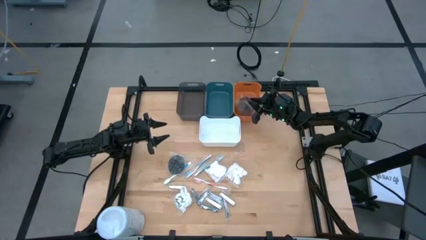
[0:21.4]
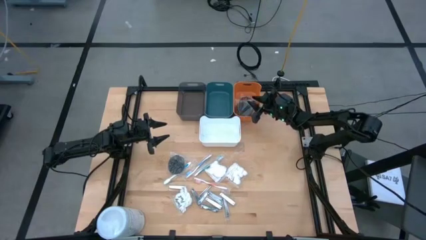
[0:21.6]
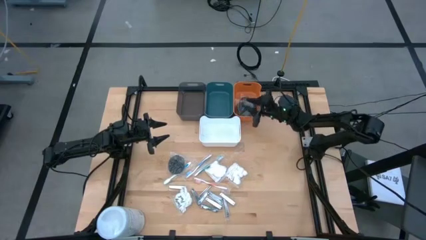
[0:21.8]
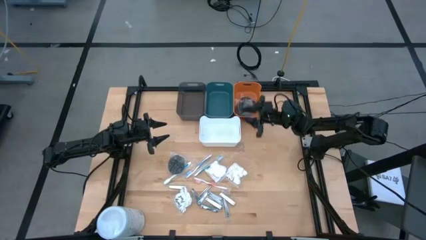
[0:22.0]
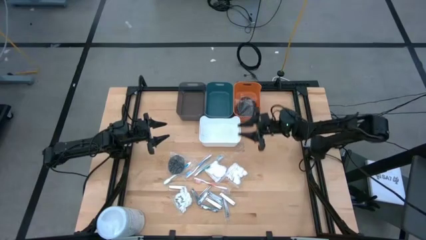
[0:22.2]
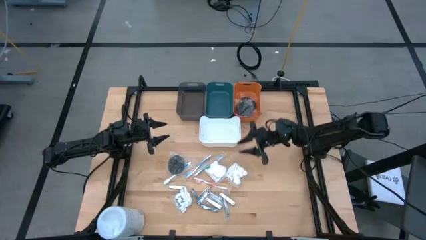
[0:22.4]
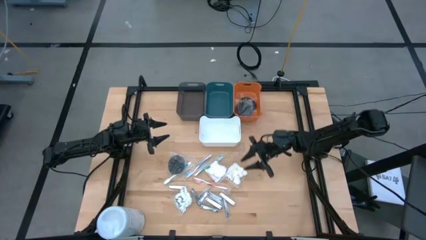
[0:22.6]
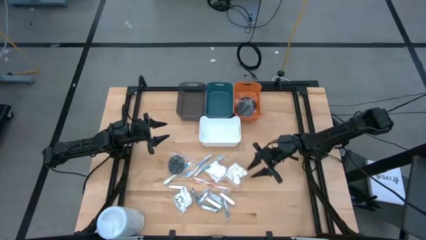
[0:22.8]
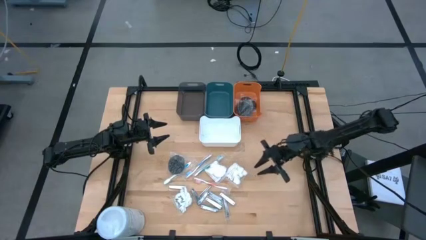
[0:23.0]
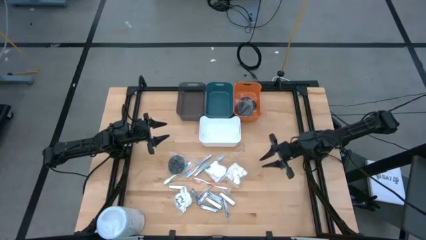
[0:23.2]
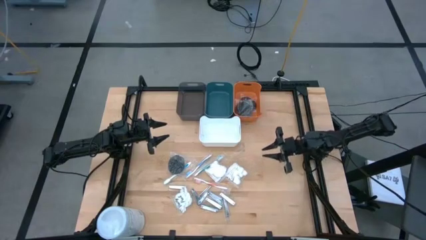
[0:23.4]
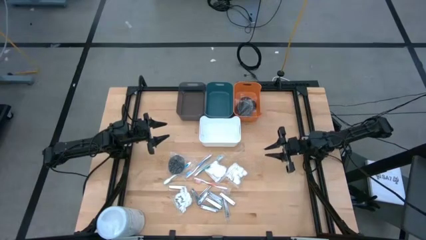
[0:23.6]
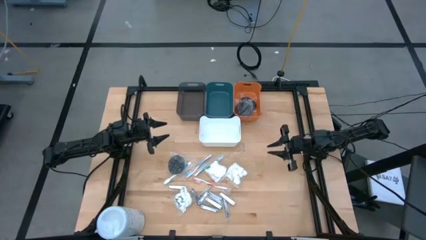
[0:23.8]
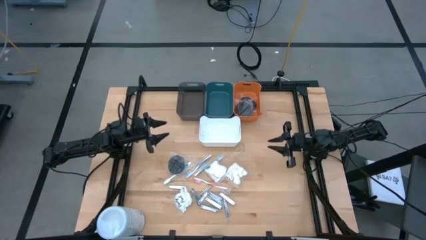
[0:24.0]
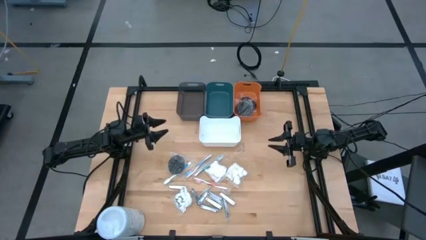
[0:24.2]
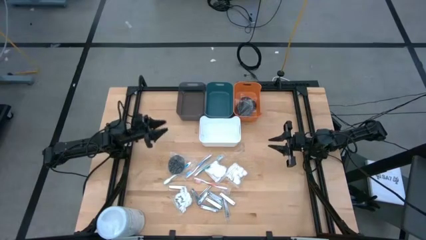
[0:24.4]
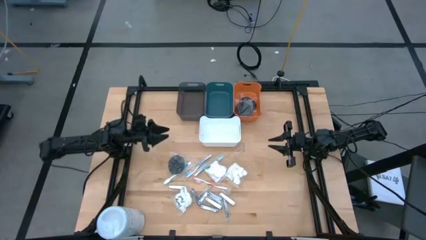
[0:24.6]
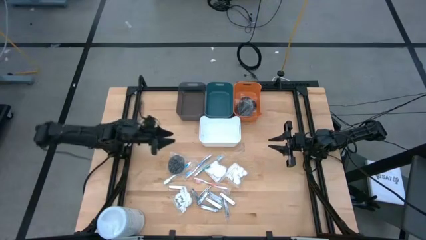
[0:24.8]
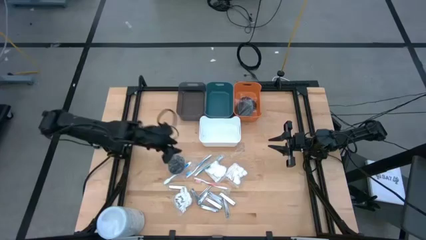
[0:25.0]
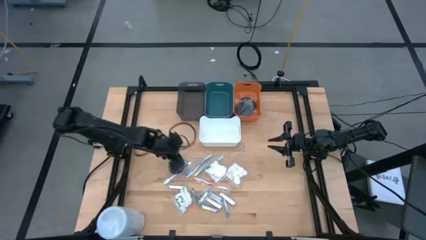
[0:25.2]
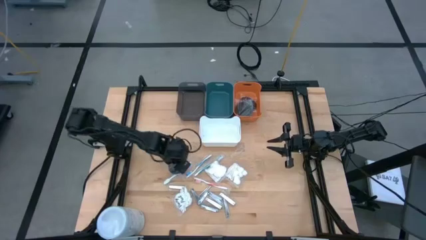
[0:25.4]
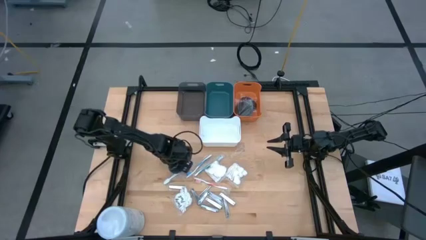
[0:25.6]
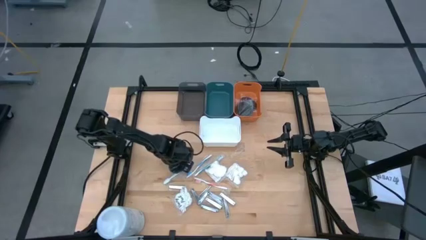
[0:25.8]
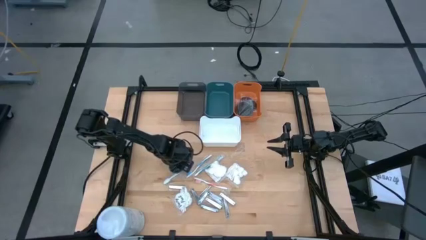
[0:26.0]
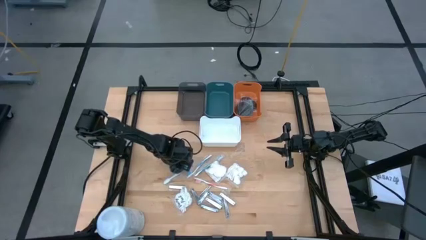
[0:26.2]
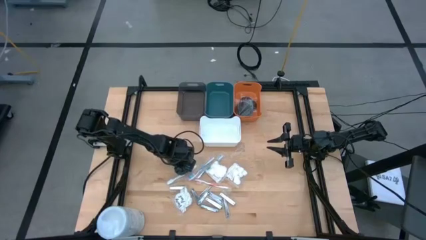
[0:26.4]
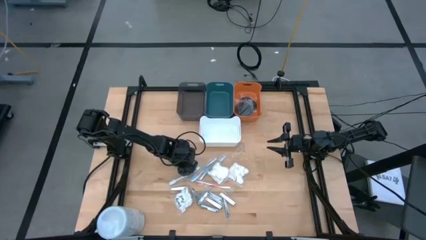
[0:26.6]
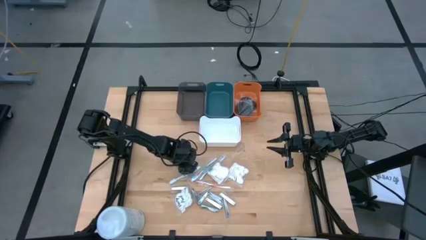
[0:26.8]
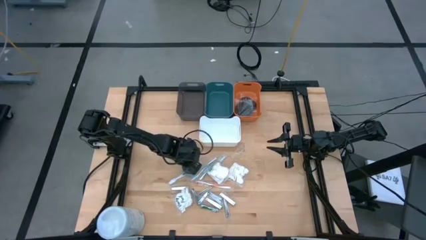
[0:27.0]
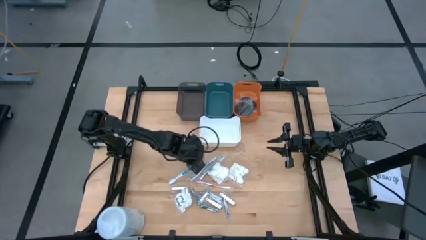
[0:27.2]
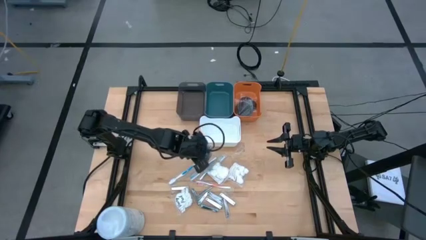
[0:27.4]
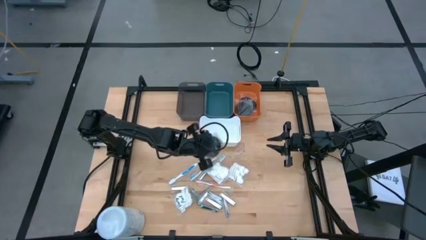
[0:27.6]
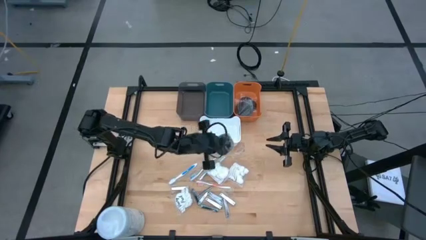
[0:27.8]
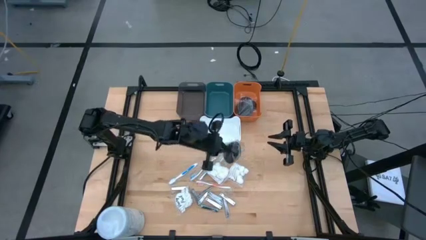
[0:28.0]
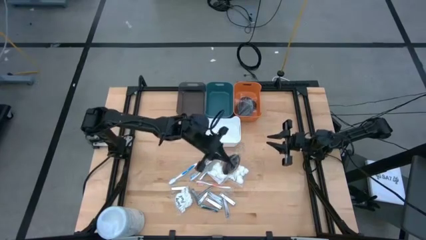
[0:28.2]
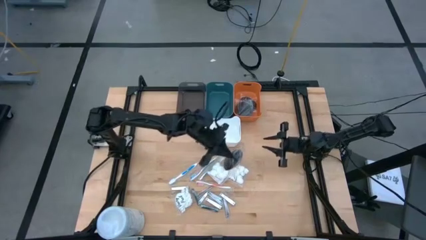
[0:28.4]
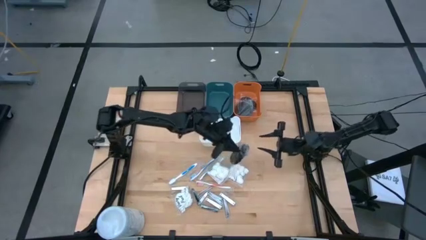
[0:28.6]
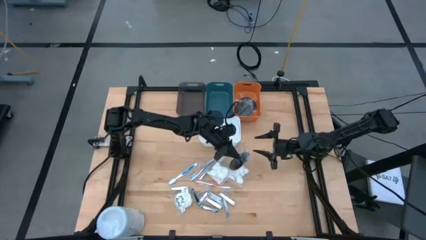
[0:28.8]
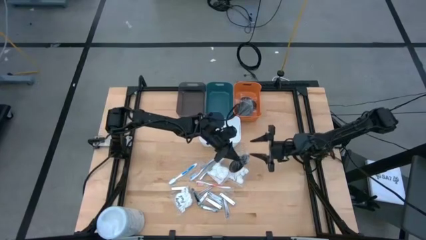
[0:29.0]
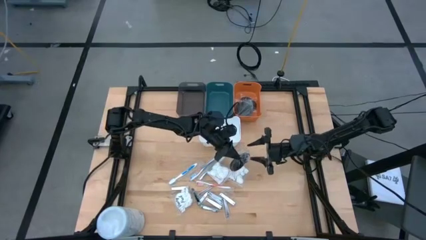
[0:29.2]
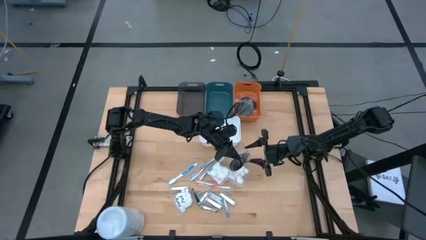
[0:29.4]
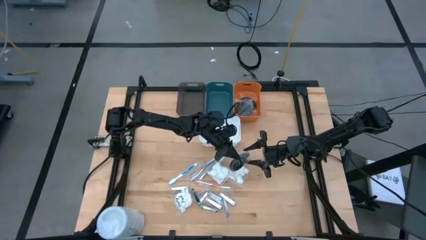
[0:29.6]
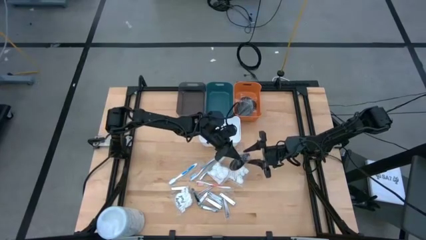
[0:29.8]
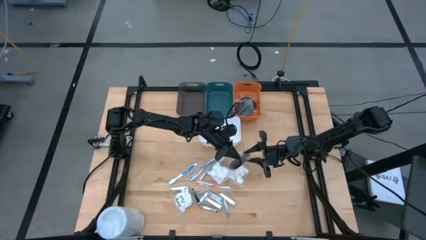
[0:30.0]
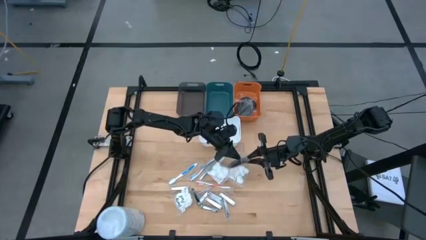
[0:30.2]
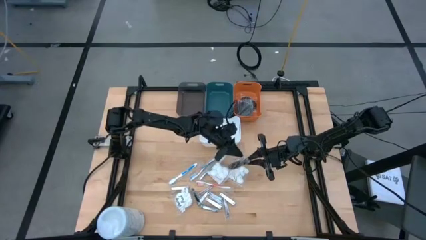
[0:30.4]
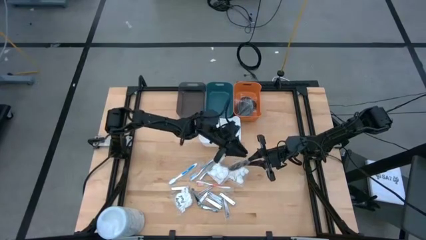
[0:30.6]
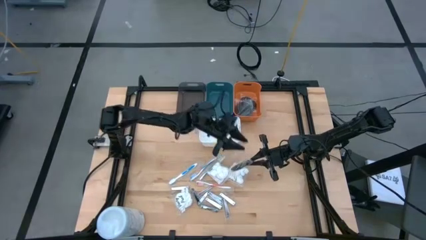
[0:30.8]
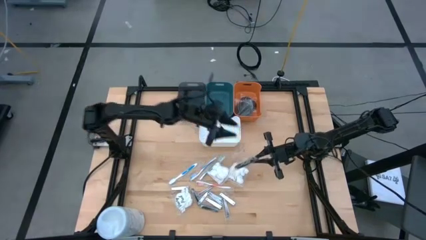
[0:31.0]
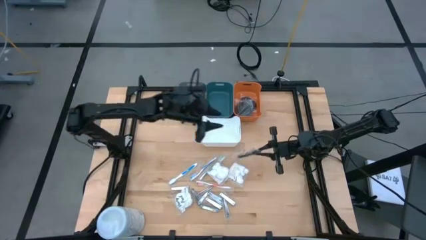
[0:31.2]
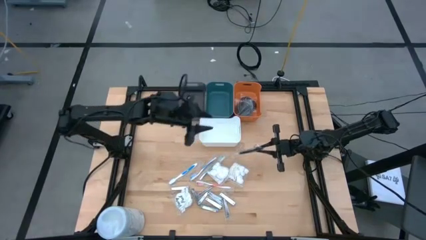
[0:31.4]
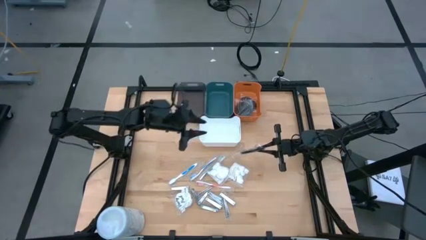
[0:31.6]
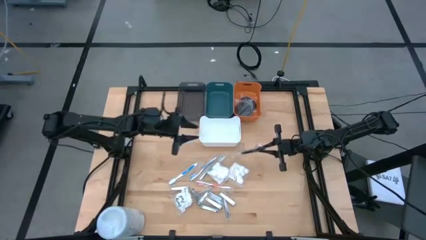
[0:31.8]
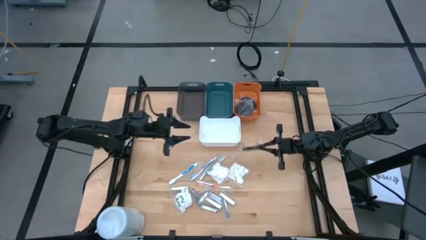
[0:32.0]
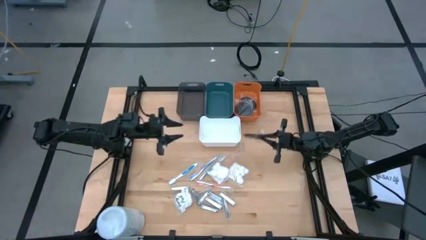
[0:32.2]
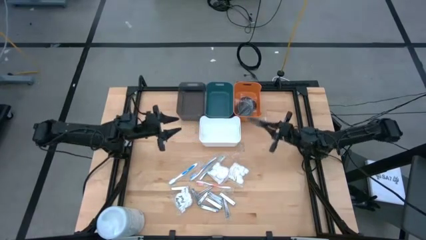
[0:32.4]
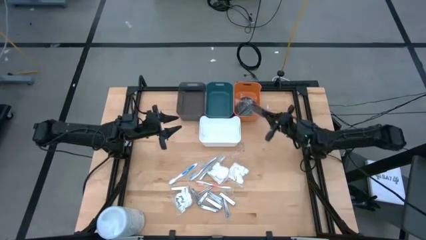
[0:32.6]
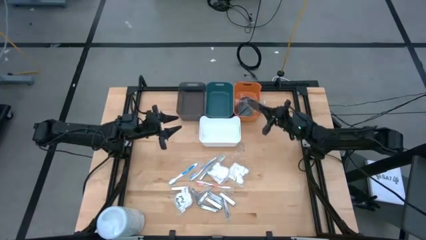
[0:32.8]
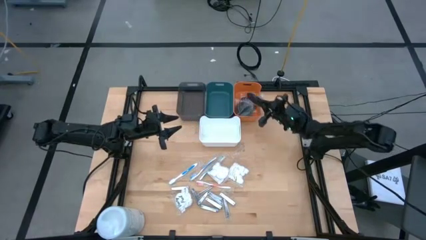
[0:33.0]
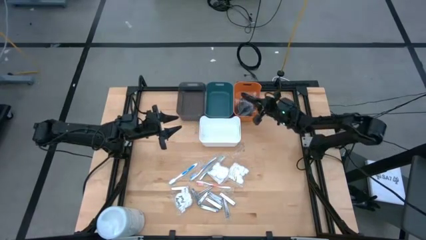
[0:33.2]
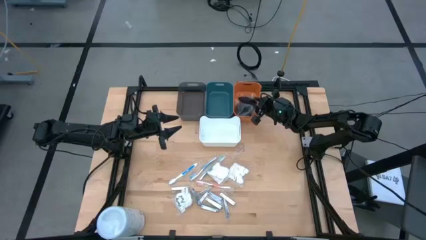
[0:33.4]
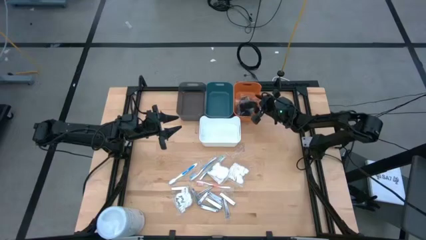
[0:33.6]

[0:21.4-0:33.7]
Task: Pick & Place Travel size toiletries
Put the black hairbrush into the orange bin
